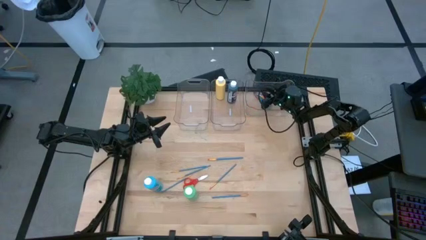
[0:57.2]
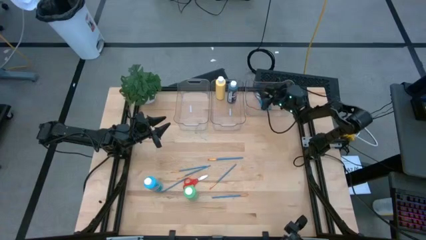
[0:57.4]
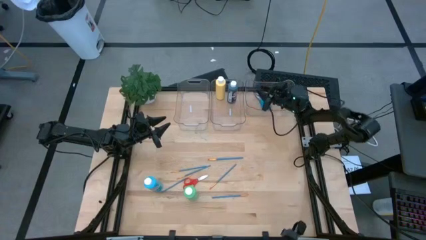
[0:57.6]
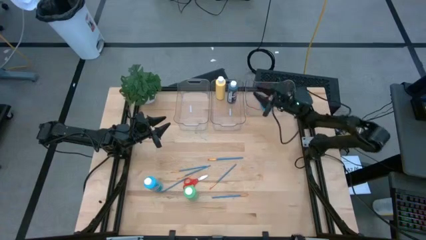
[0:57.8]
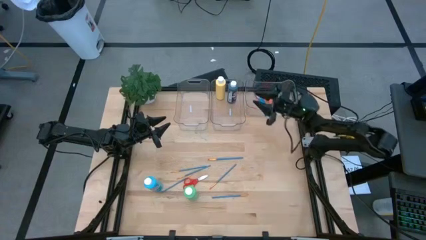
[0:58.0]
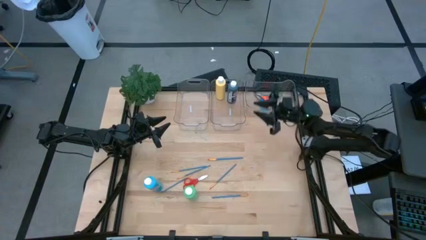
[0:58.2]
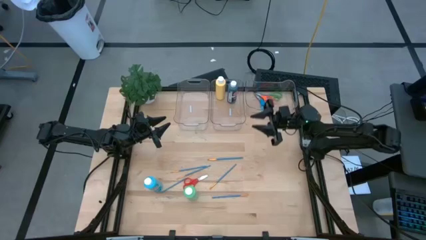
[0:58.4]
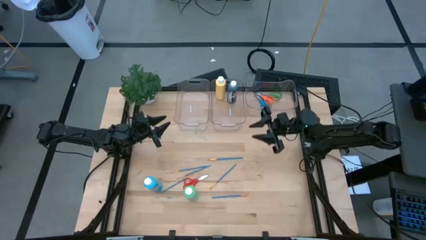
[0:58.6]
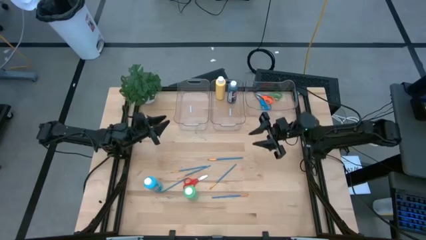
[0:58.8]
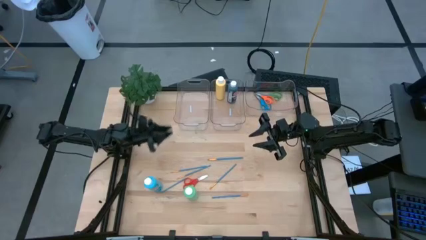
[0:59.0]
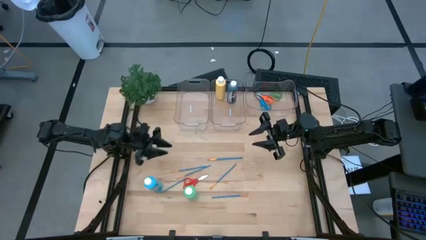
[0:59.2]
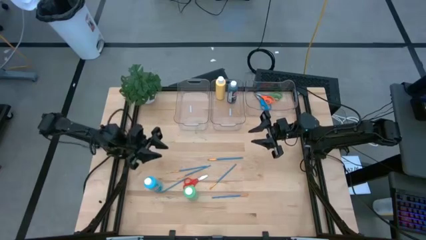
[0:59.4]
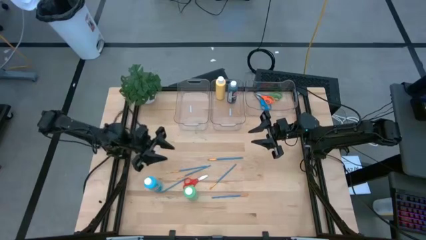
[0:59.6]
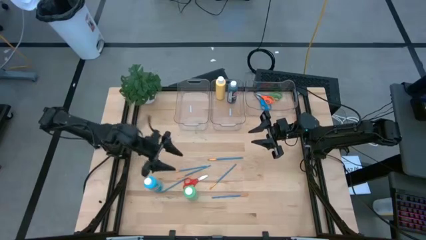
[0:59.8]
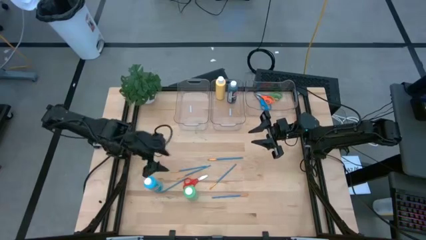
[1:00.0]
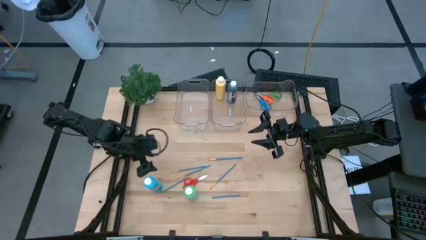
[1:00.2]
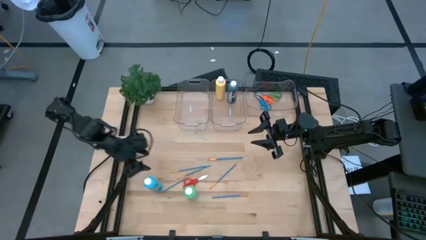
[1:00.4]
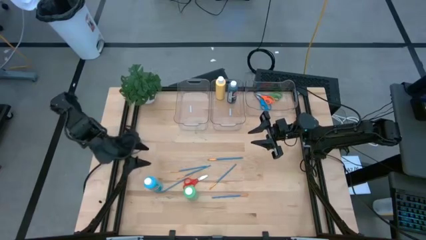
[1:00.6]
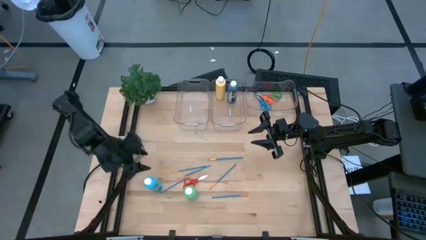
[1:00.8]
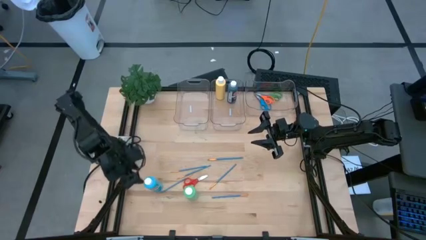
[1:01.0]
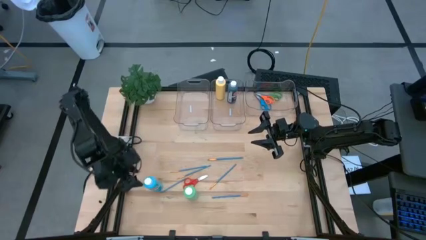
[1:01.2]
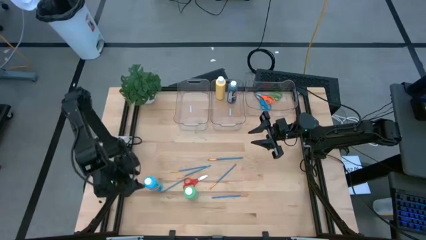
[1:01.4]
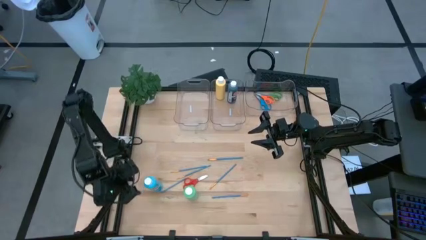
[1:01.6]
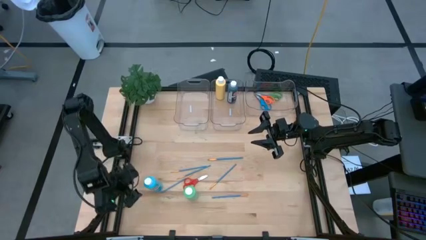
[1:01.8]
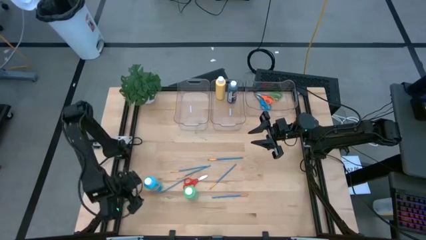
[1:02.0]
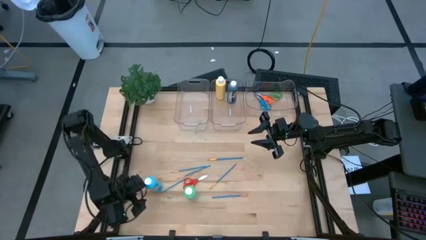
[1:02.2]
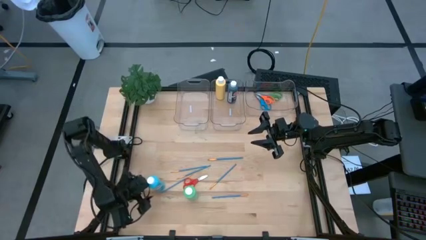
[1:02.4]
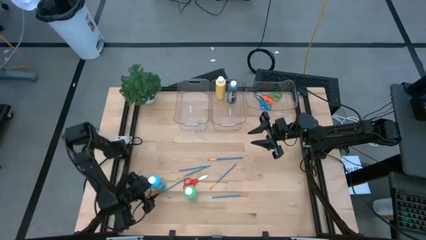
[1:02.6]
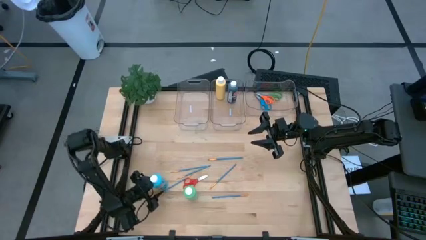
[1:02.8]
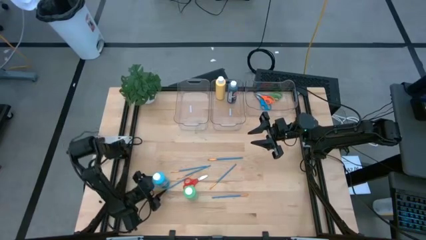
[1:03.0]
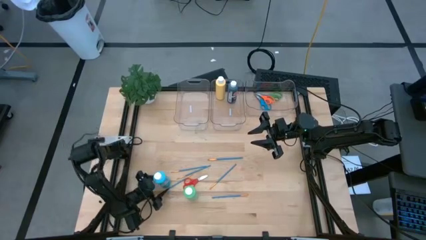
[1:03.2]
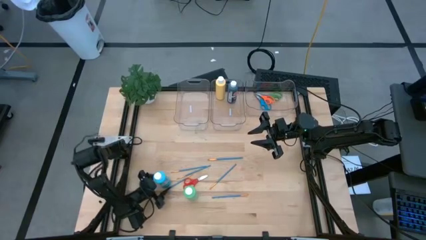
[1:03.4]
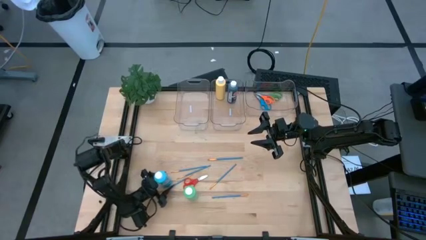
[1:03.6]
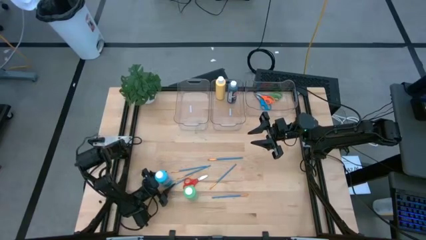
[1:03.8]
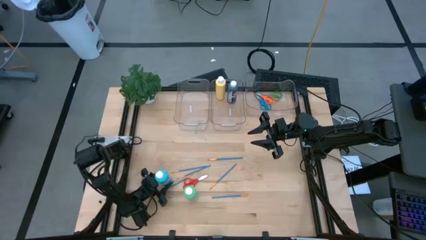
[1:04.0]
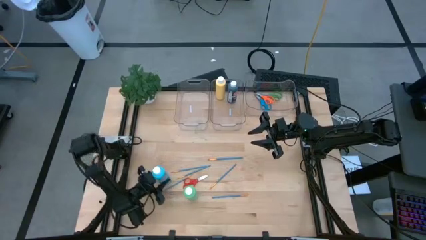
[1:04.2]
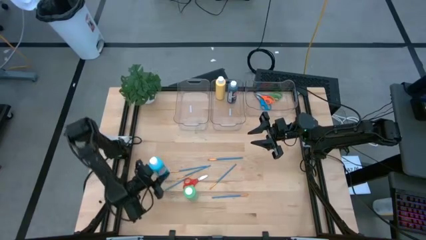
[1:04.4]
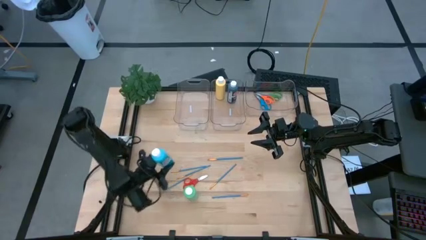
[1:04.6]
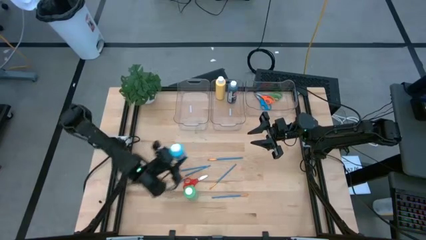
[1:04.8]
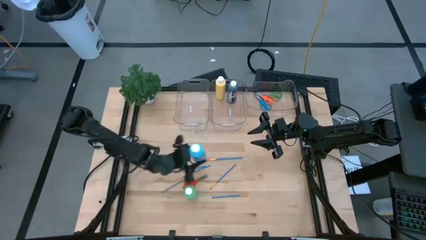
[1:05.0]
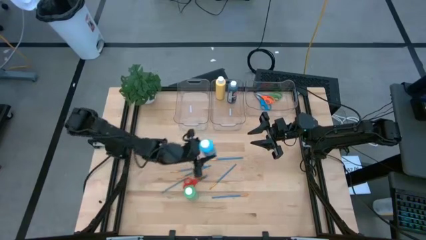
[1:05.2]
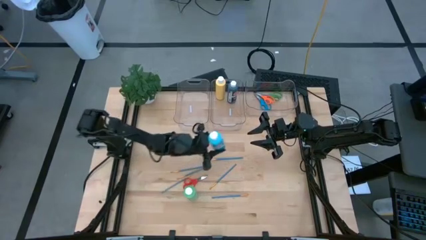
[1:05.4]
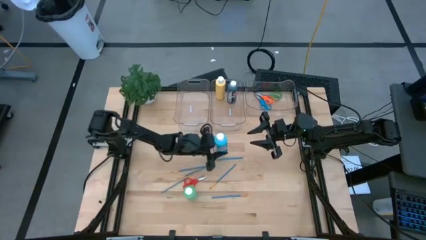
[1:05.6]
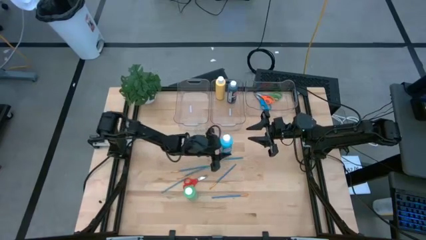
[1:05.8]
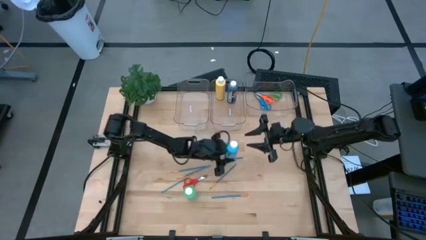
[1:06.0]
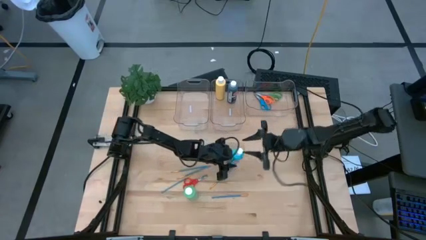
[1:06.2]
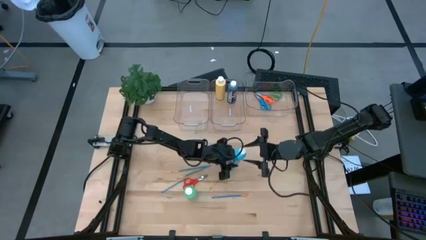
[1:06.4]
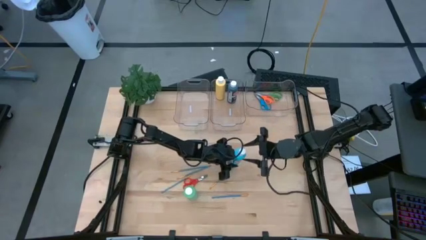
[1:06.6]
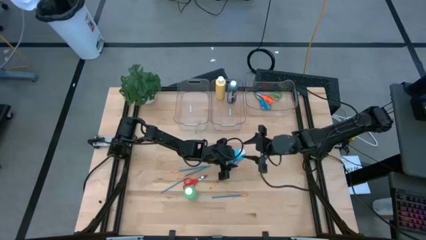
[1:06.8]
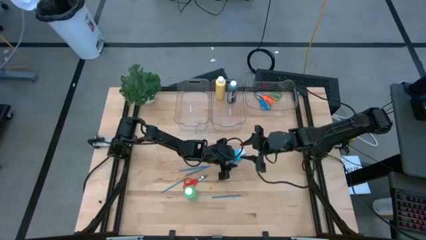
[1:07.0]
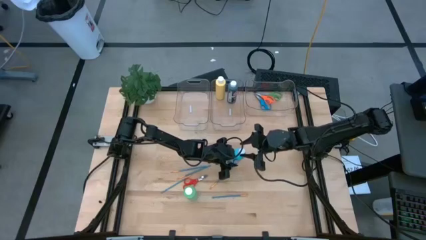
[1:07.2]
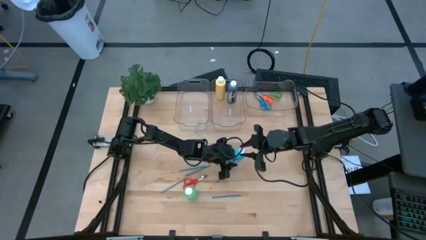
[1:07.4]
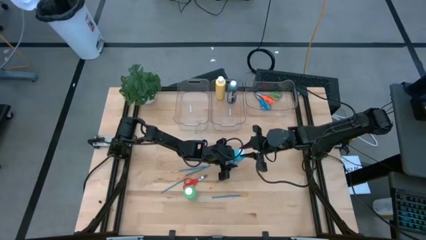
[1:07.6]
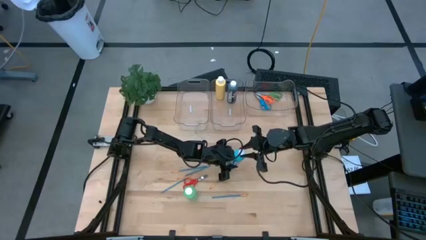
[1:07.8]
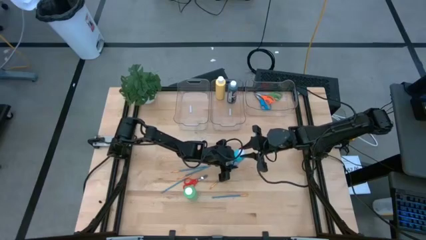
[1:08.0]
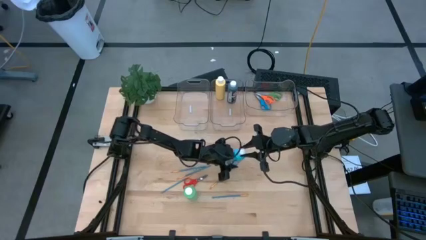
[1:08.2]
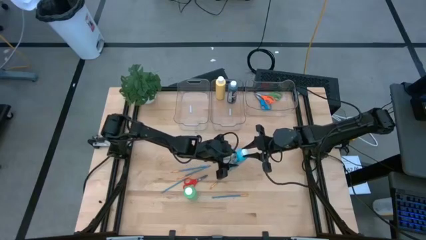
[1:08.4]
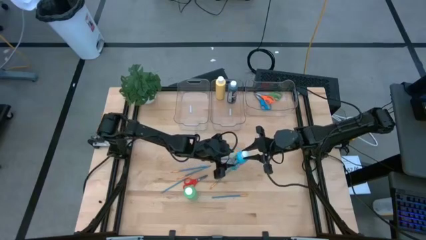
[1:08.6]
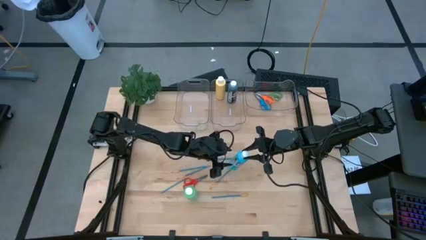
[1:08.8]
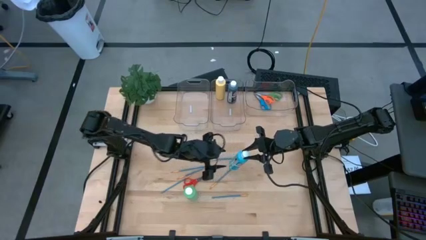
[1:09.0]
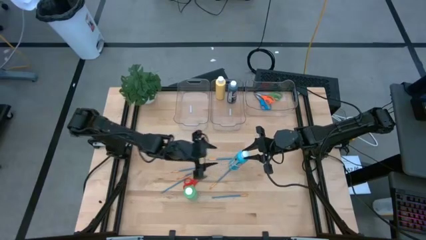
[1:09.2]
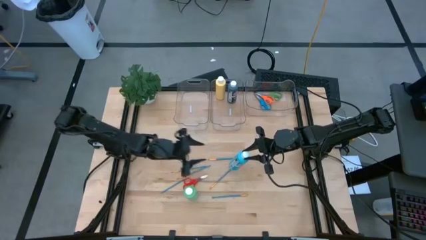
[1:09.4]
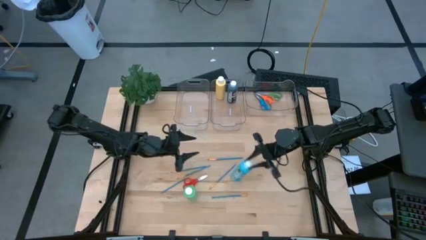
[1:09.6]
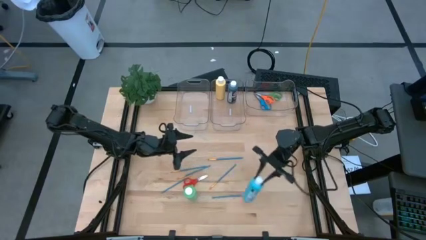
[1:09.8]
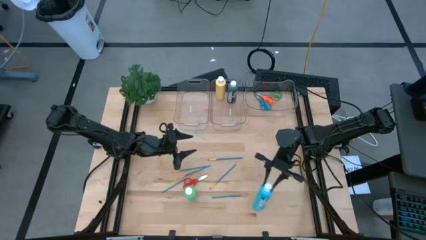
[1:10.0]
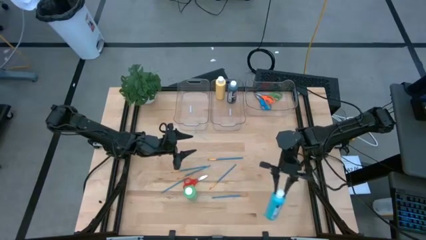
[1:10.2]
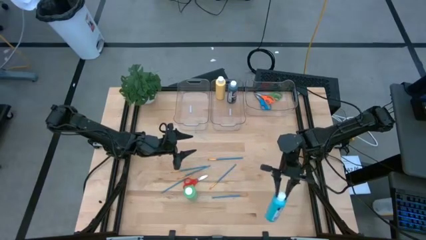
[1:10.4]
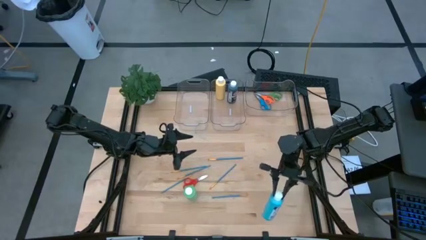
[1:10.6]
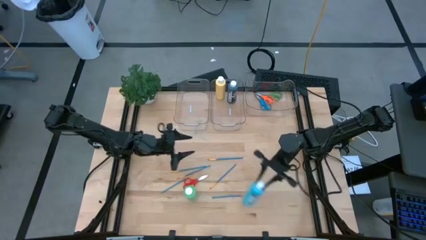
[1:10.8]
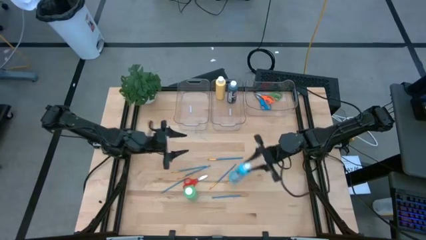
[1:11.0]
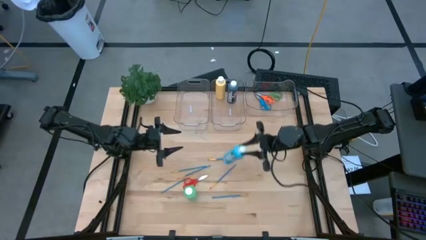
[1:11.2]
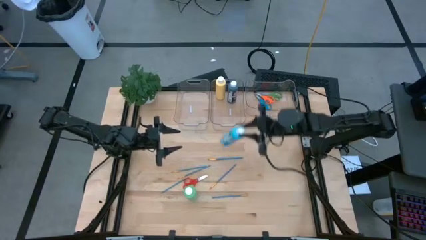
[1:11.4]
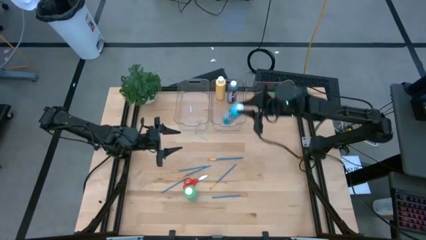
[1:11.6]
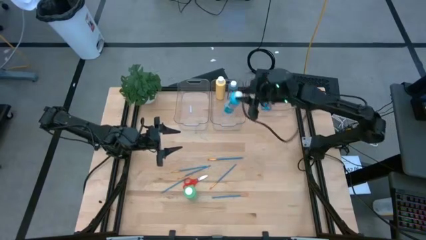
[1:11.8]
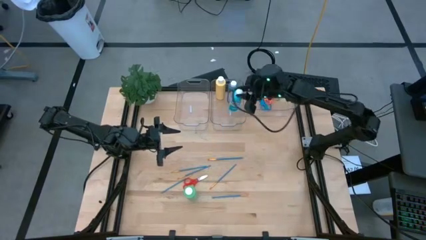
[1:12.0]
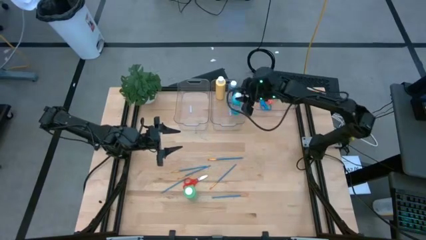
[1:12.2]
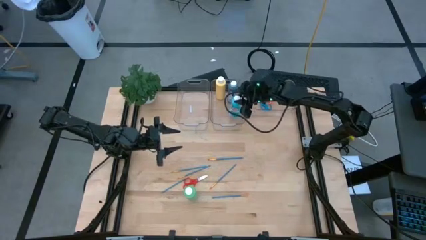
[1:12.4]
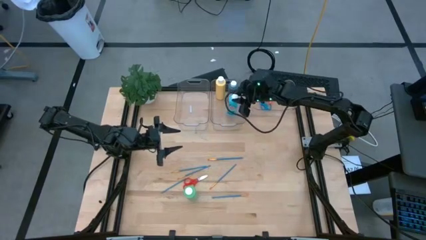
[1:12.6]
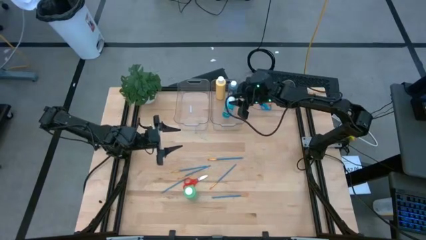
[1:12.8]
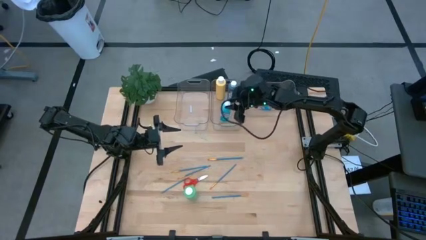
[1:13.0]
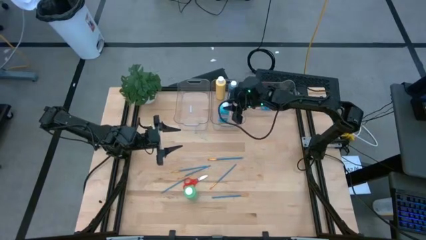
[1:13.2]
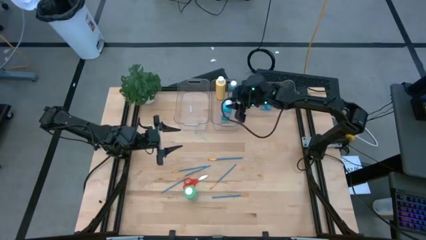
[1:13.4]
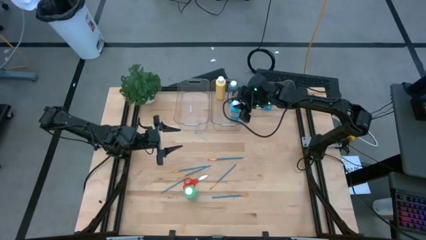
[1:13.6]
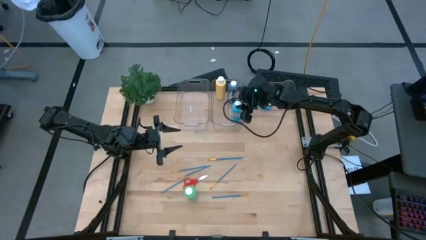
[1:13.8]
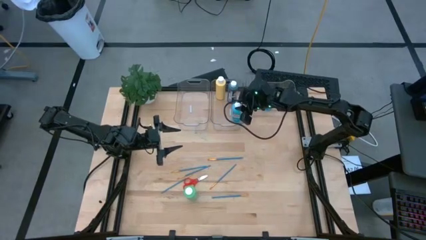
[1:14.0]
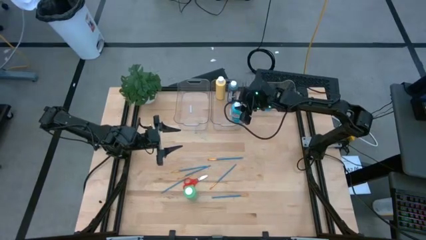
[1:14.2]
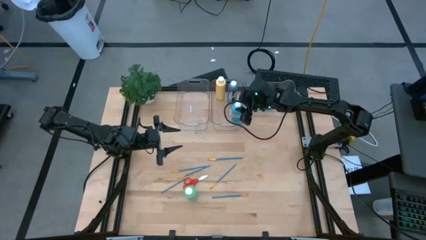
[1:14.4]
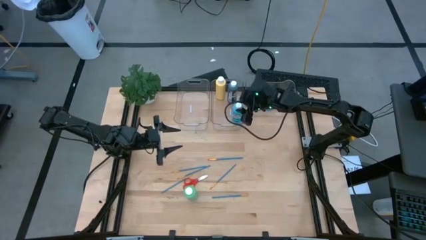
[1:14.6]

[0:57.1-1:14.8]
Task: Pick & Place Paint Supplies
Put the blue paint bottle into the middle transparent bin
